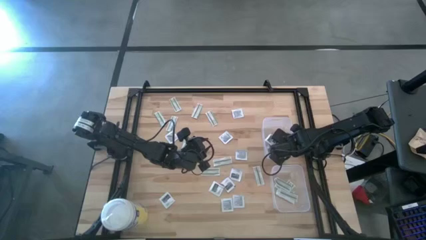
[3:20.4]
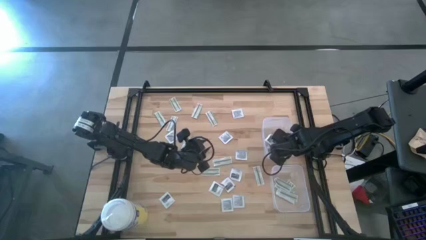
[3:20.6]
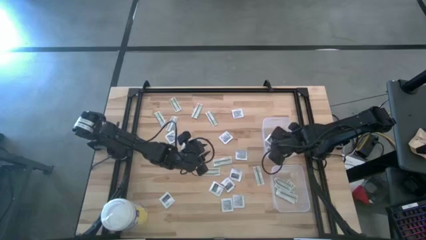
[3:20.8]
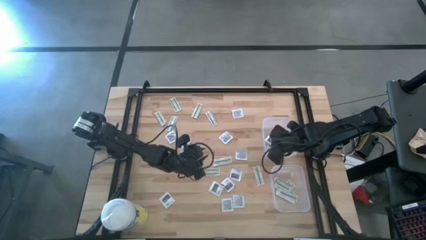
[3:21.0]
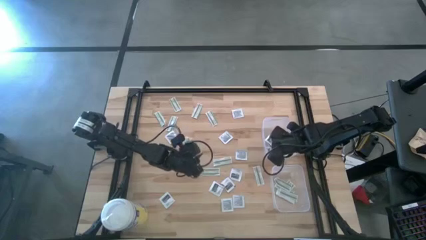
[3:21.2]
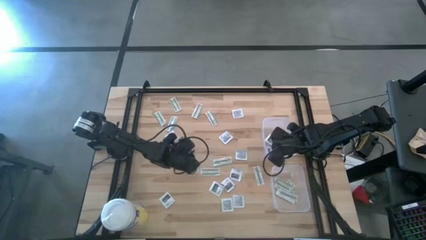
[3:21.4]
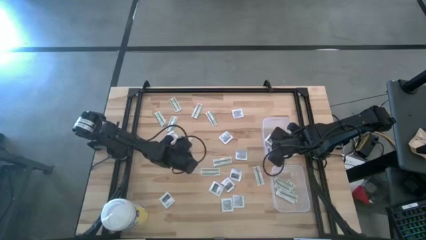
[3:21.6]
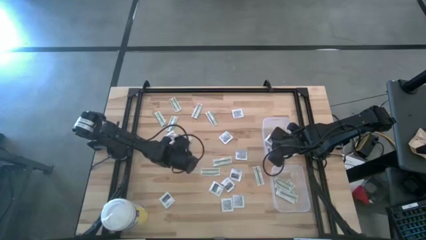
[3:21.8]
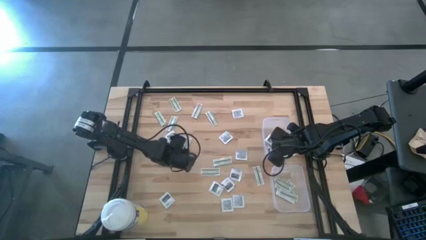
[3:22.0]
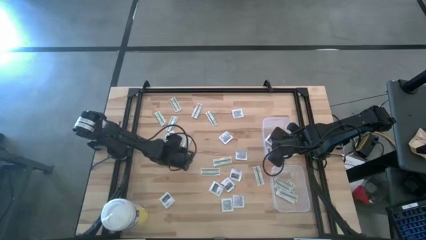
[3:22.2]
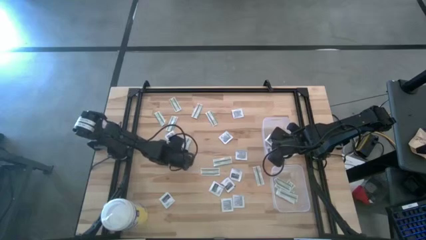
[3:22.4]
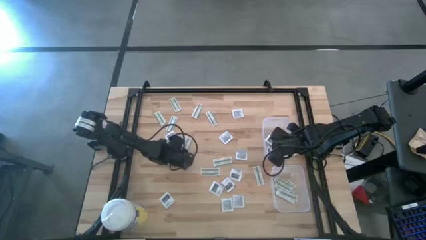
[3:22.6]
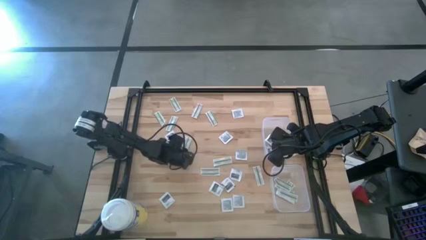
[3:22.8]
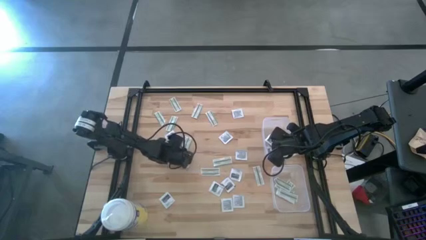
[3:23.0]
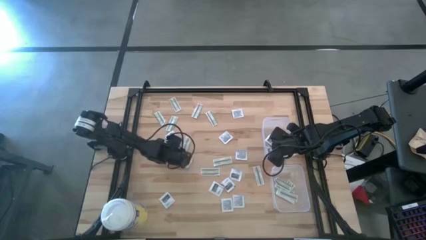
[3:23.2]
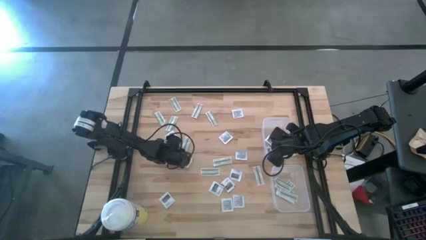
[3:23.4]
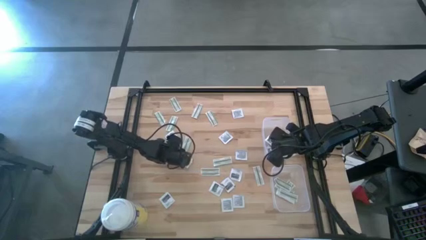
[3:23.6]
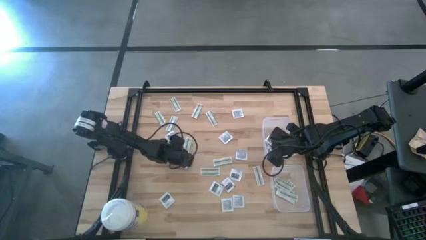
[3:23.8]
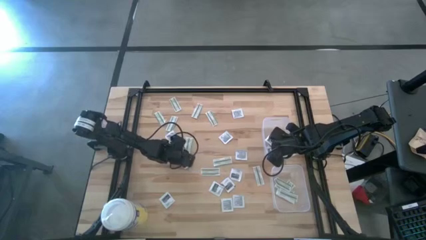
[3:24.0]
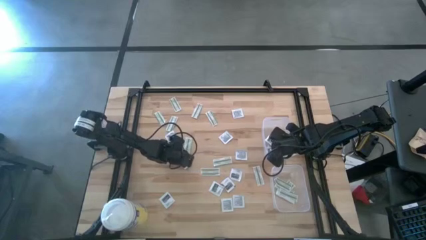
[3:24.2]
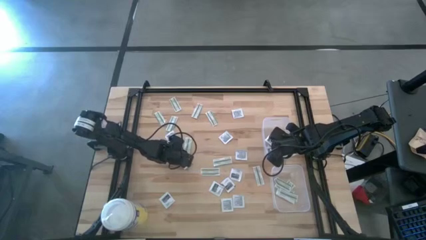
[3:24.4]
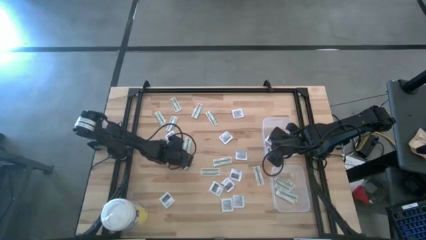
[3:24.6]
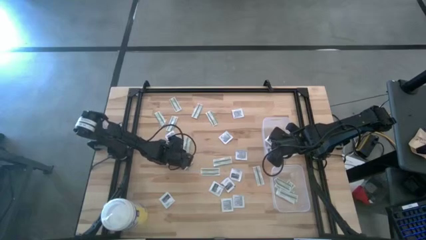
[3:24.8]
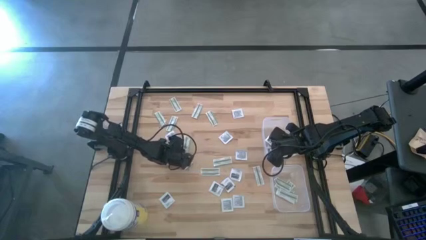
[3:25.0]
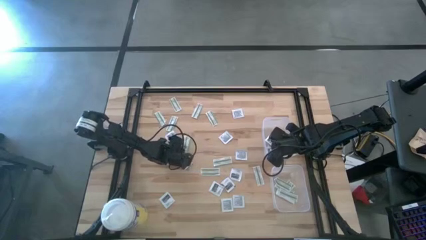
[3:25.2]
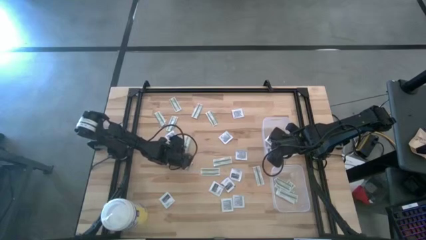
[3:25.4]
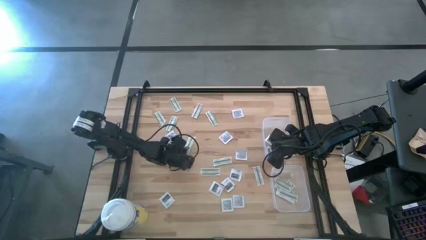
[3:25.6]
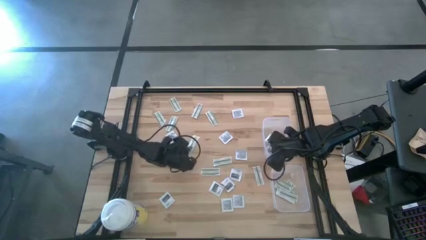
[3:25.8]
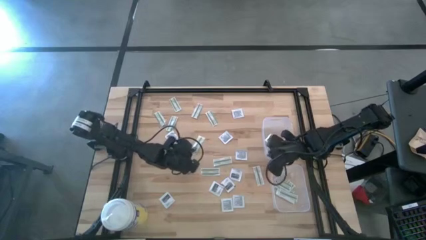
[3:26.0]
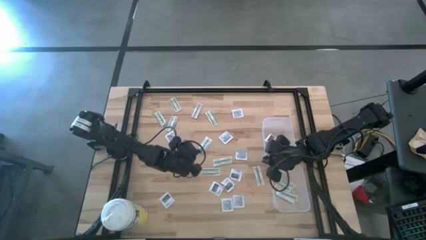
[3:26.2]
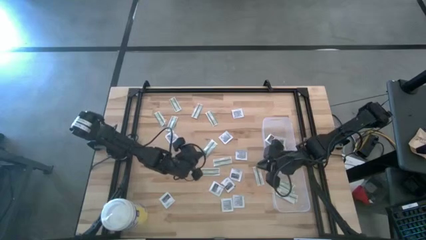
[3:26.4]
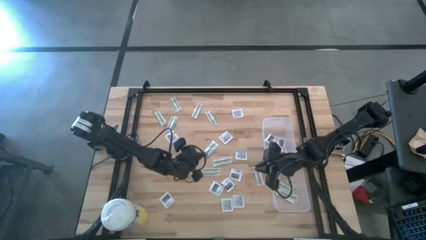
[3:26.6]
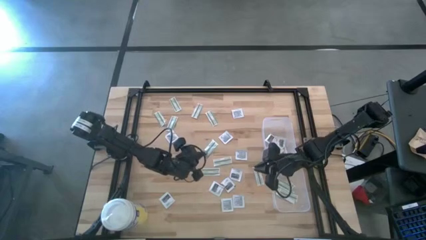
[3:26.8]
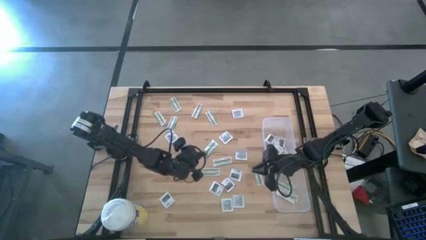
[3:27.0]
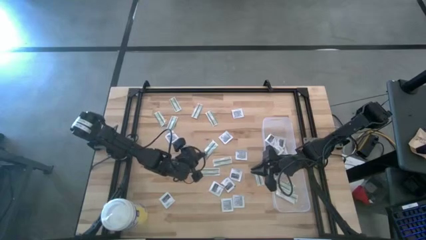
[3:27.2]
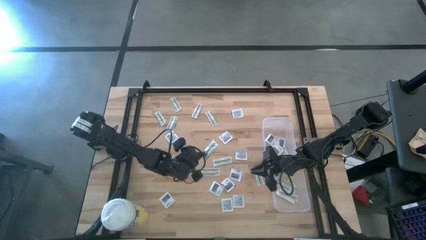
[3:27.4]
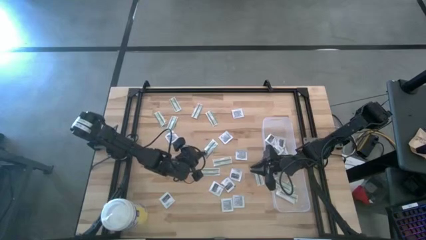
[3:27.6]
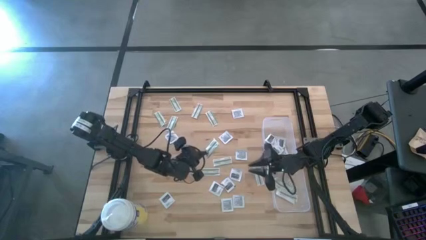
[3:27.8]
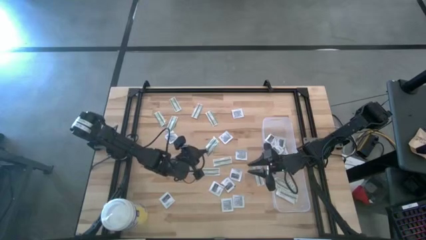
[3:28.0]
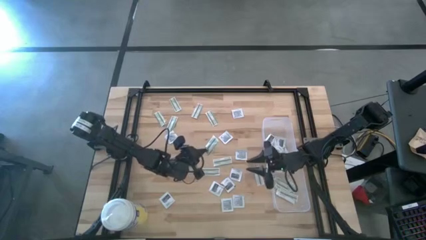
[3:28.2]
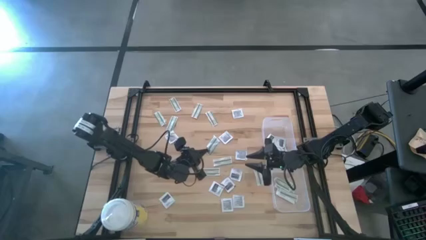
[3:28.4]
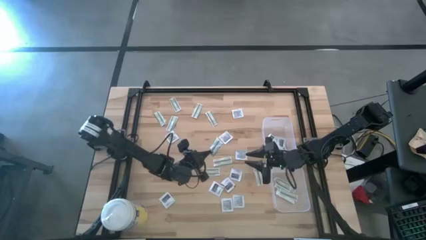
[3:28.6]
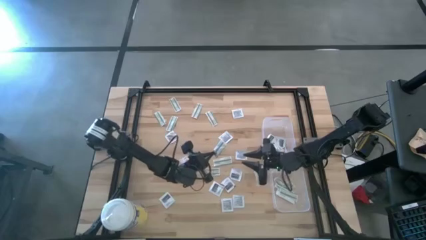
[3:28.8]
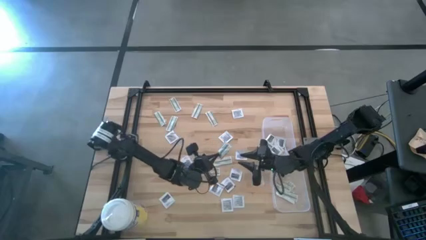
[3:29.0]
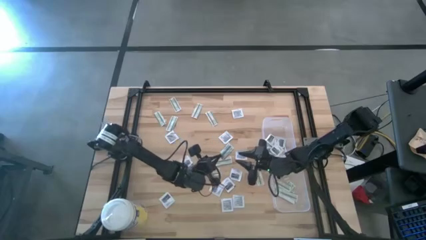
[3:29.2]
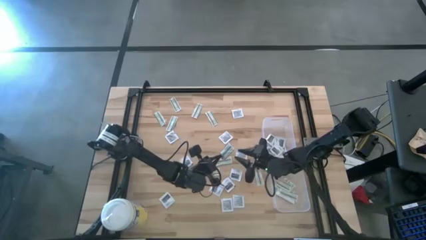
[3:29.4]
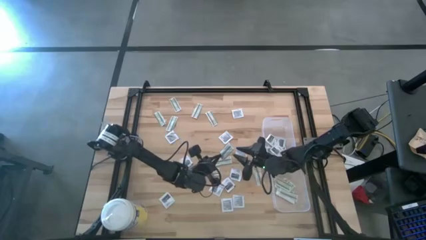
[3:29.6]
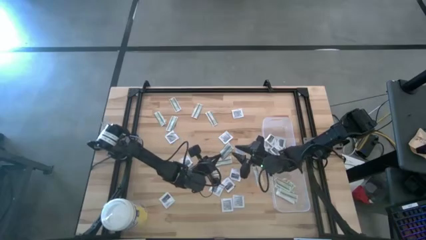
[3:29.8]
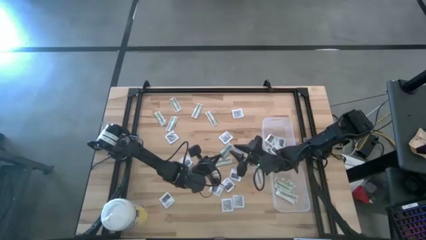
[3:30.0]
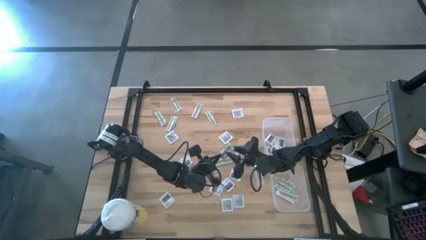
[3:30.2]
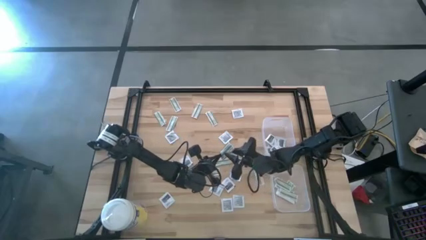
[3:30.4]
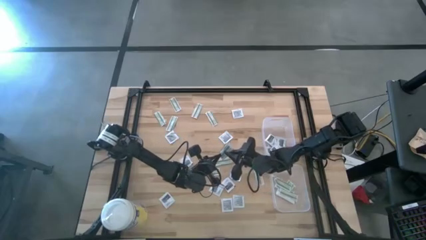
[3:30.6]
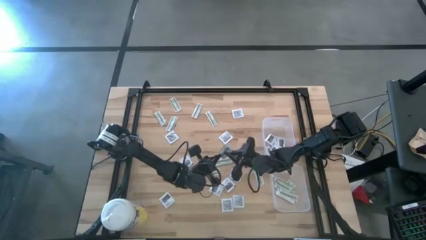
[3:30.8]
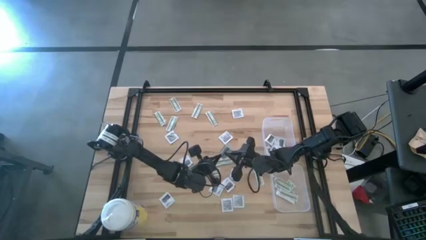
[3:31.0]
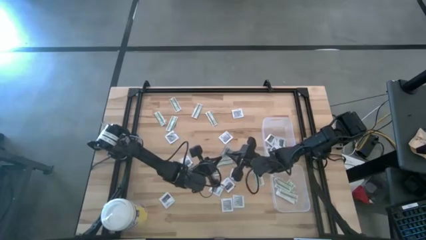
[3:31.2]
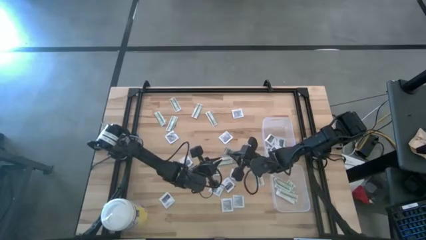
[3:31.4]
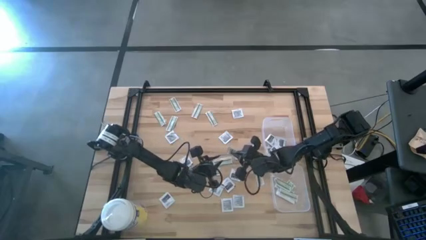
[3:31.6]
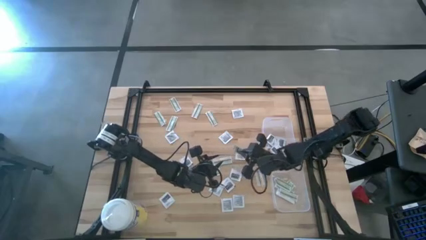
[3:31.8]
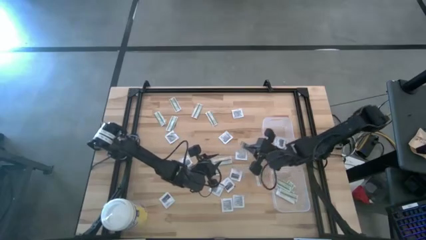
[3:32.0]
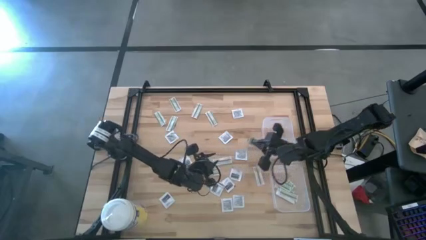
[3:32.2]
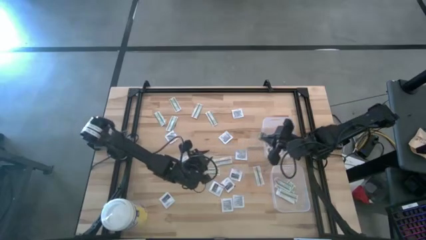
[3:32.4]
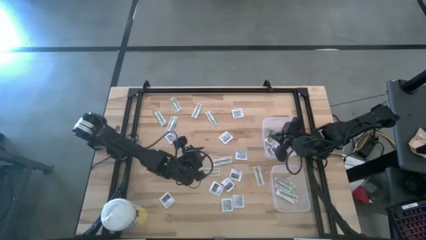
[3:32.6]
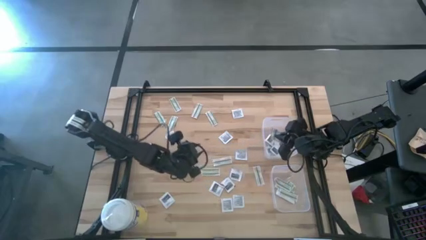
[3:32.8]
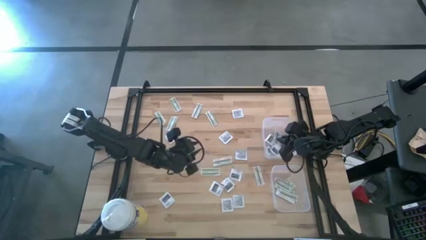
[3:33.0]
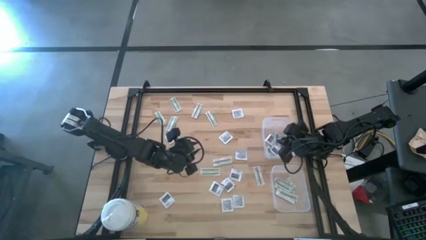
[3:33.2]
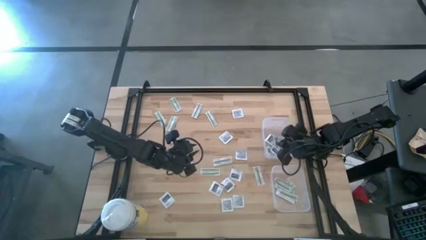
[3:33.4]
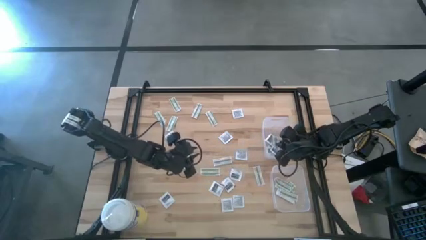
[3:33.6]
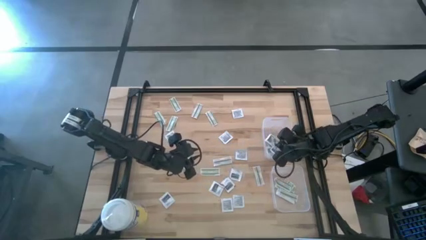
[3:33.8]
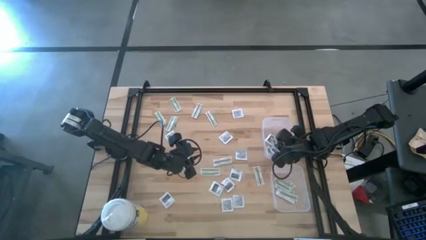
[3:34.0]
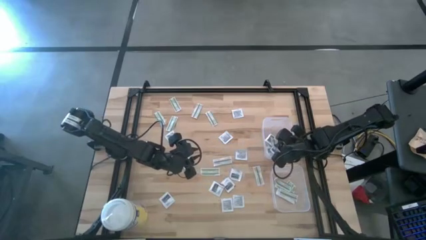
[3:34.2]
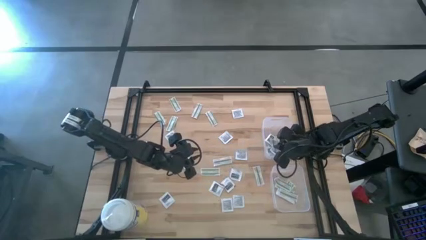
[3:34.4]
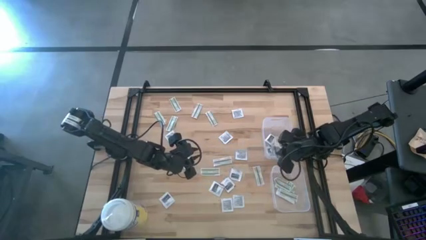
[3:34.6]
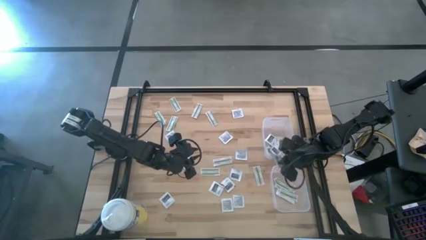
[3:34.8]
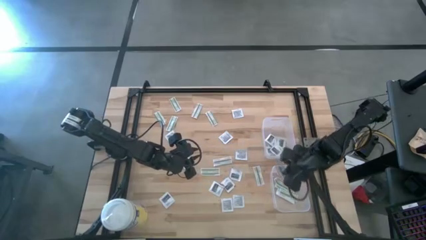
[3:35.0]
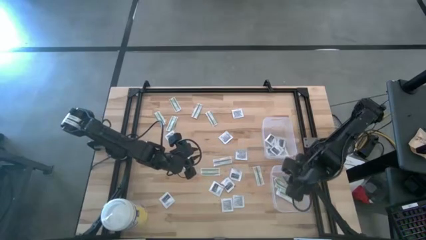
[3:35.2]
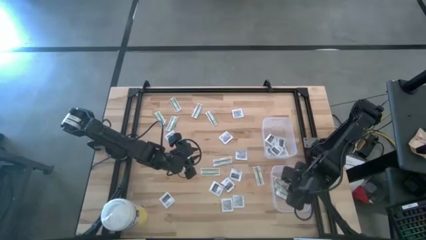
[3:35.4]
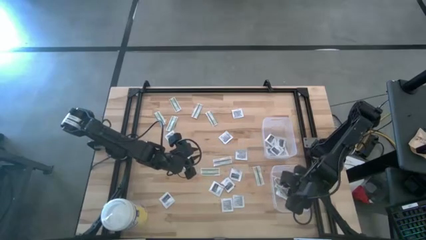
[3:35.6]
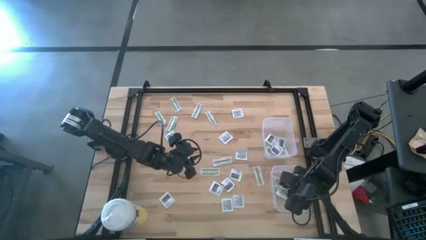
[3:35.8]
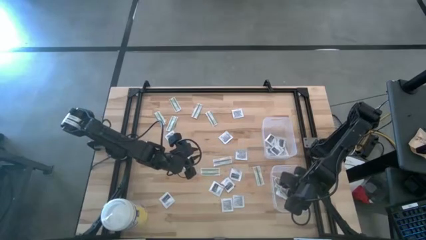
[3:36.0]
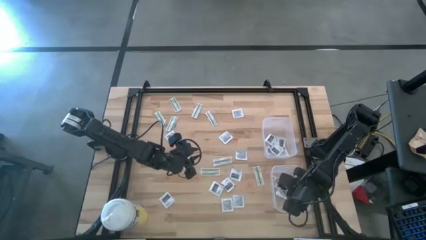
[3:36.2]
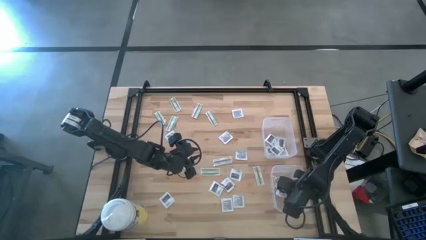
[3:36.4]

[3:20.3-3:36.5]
Task: Pick & Place First Aid Supplies
Put the bandage pack into the bottom bin
